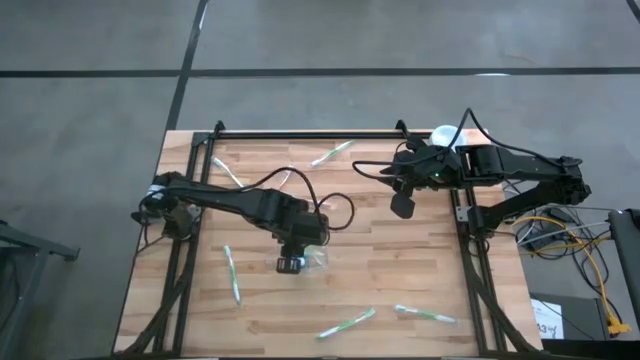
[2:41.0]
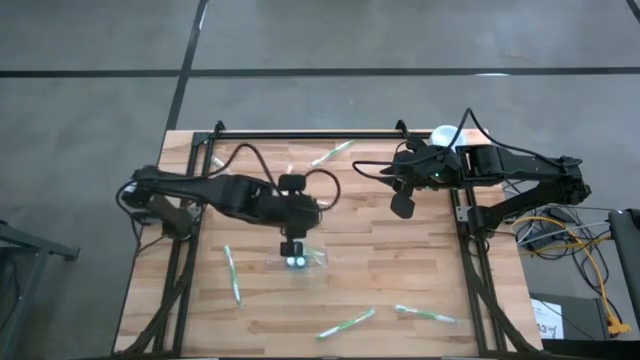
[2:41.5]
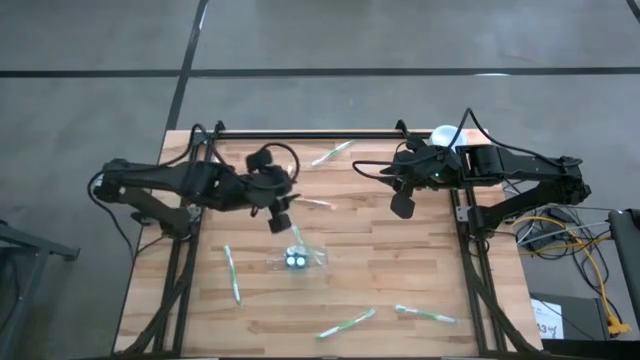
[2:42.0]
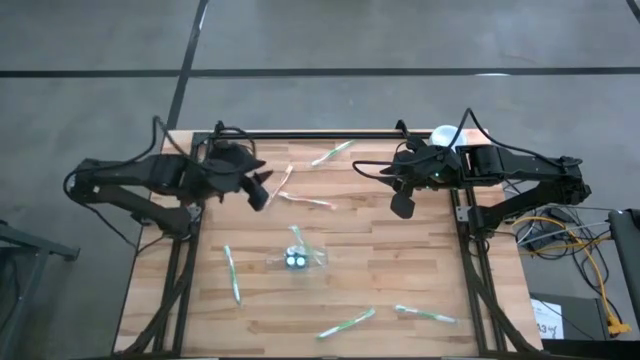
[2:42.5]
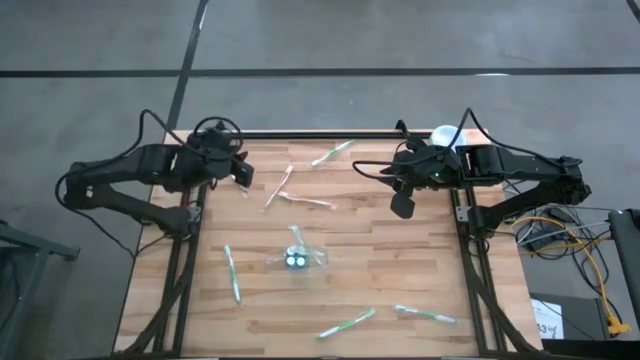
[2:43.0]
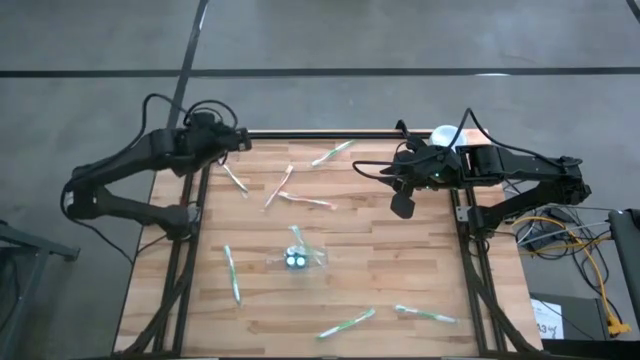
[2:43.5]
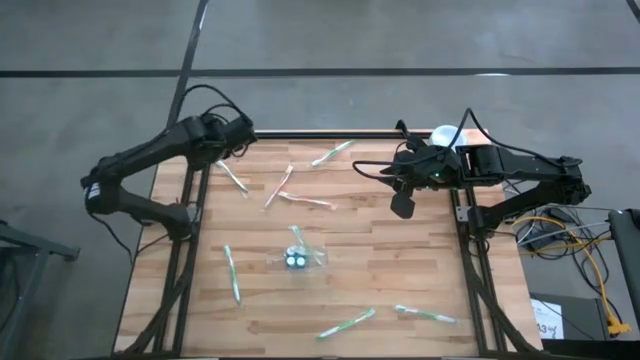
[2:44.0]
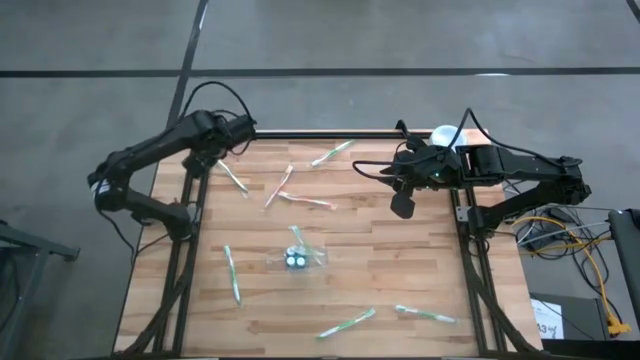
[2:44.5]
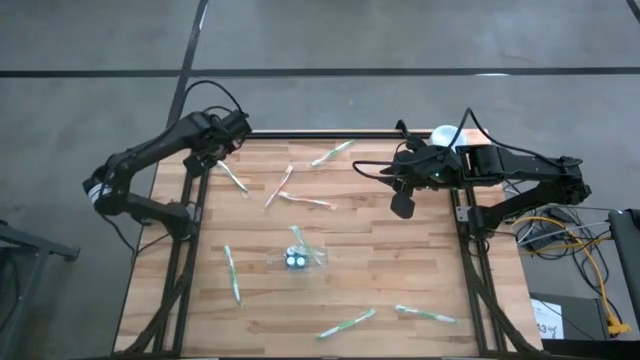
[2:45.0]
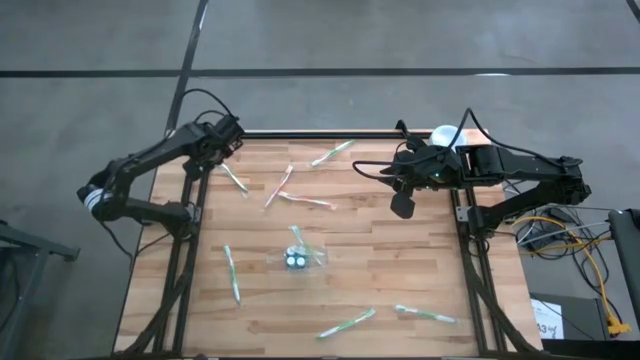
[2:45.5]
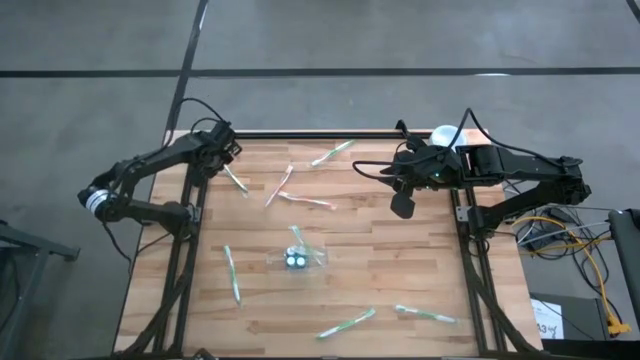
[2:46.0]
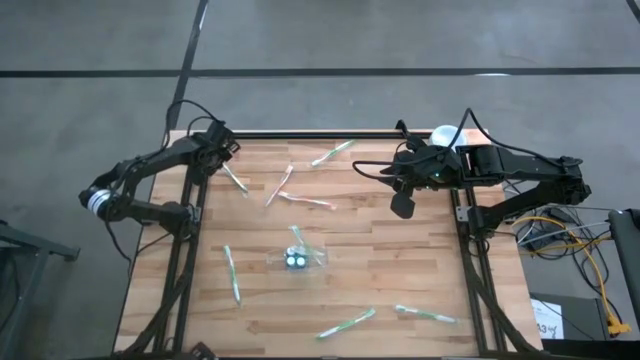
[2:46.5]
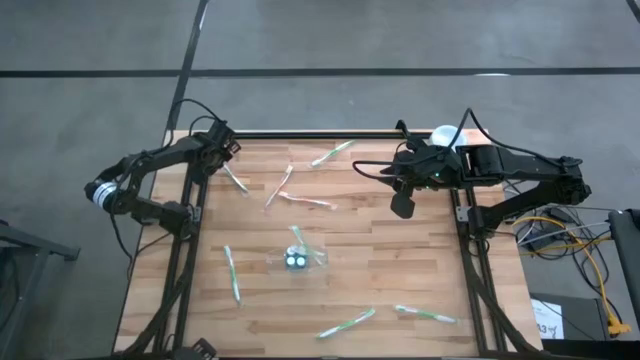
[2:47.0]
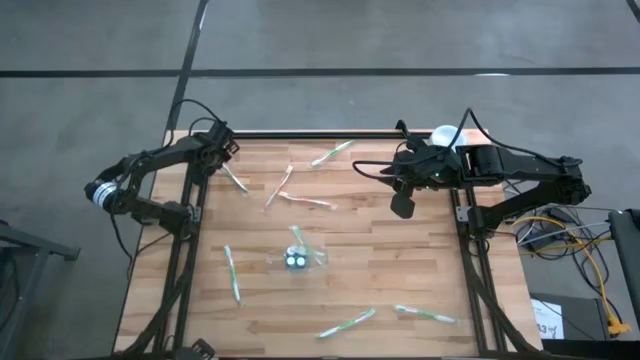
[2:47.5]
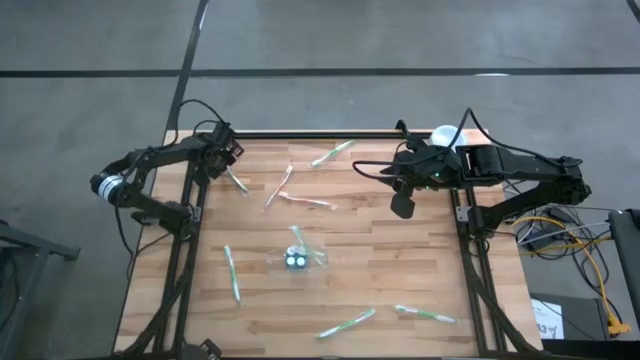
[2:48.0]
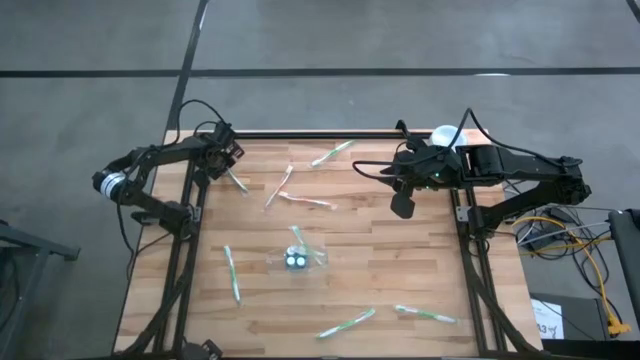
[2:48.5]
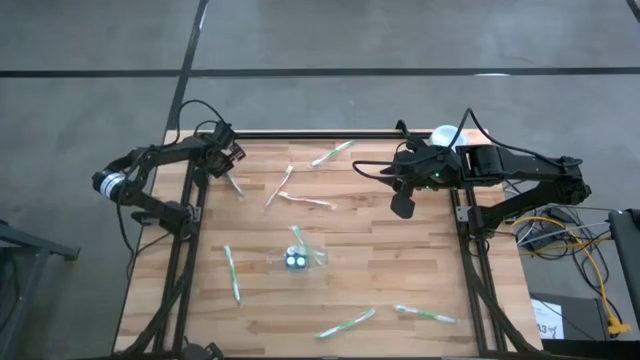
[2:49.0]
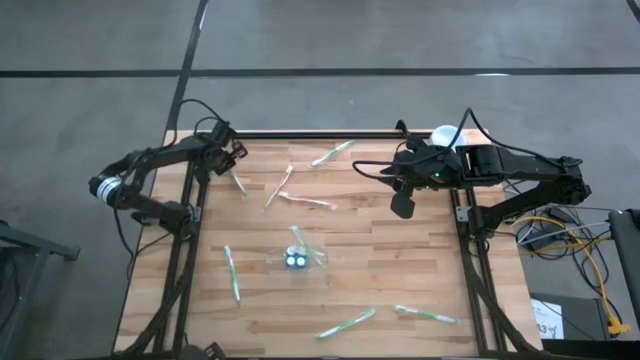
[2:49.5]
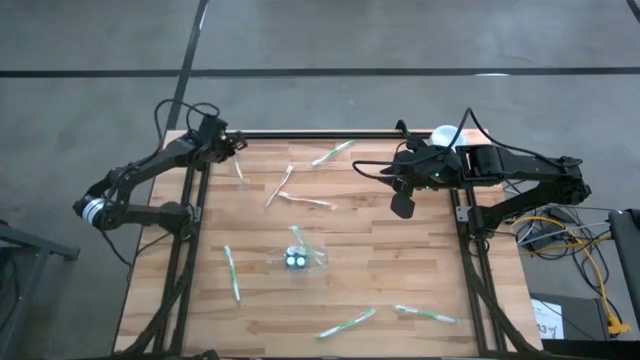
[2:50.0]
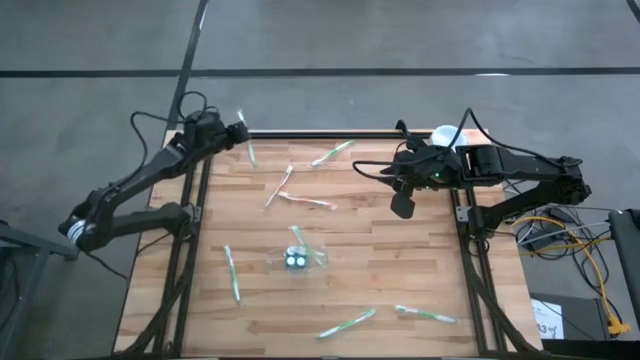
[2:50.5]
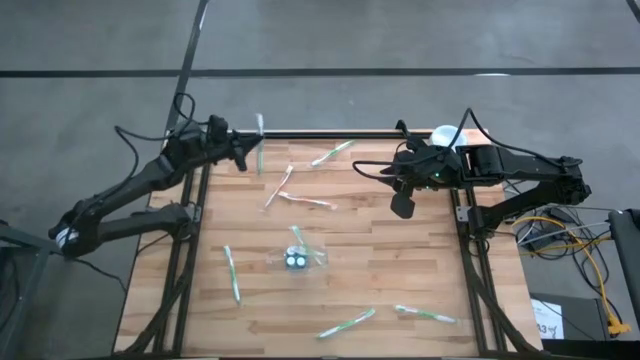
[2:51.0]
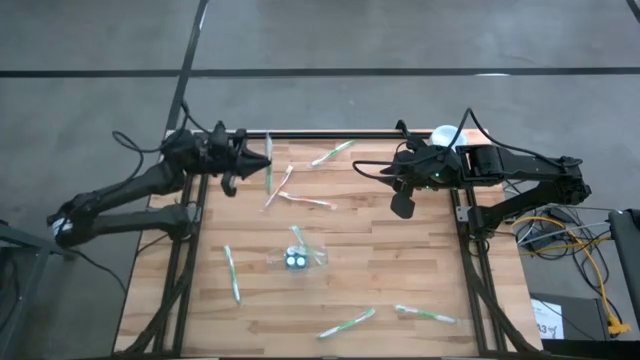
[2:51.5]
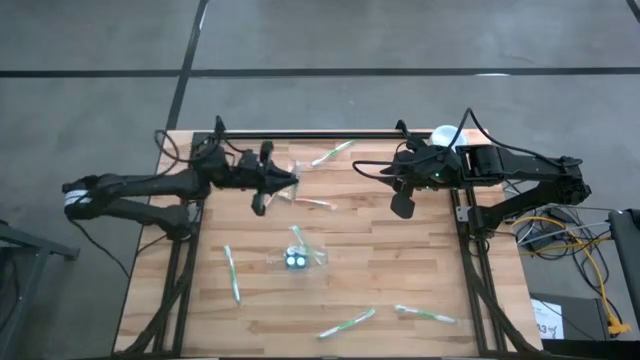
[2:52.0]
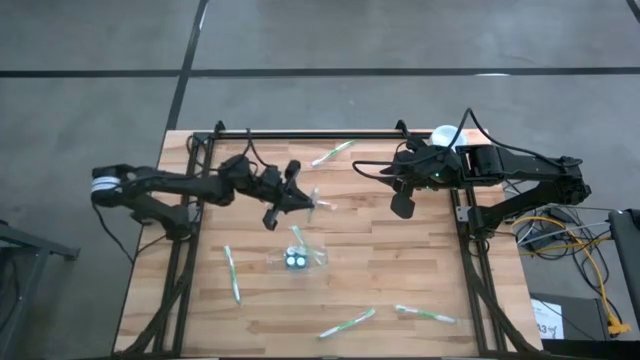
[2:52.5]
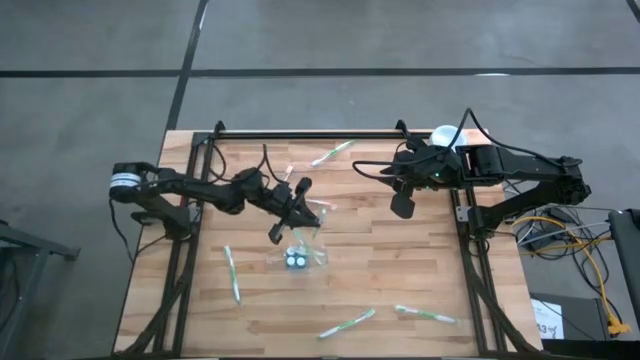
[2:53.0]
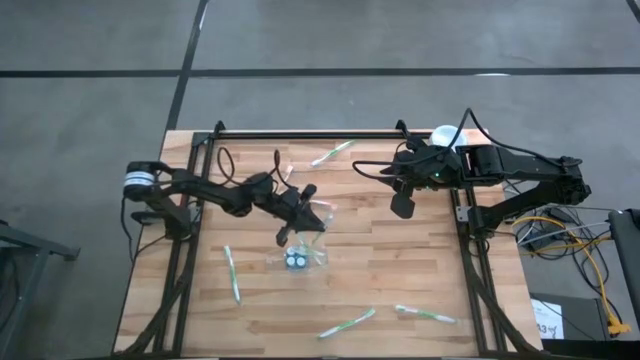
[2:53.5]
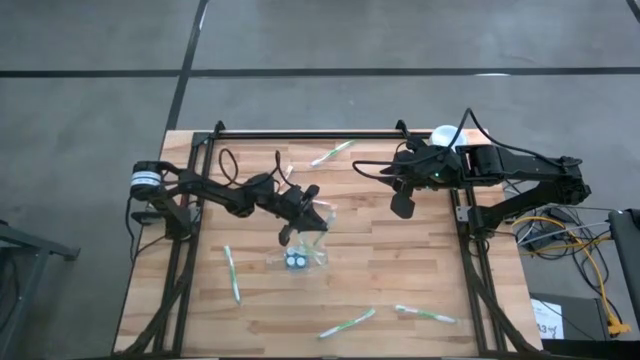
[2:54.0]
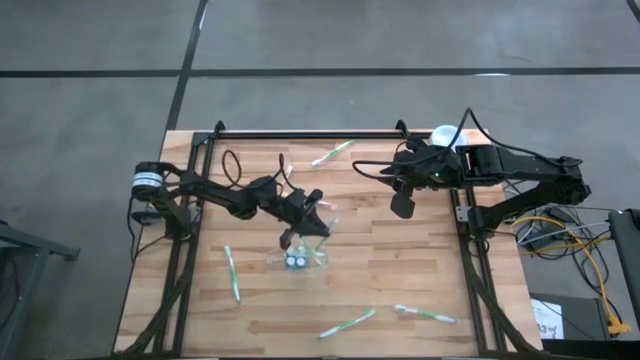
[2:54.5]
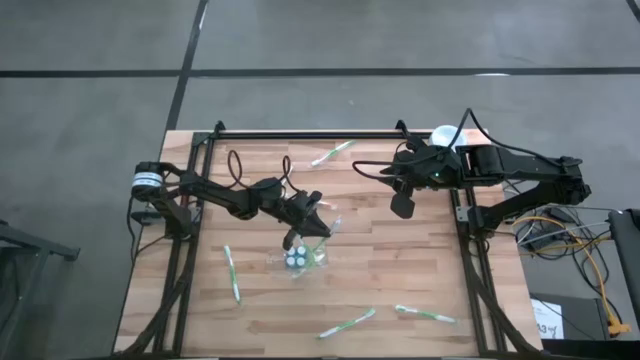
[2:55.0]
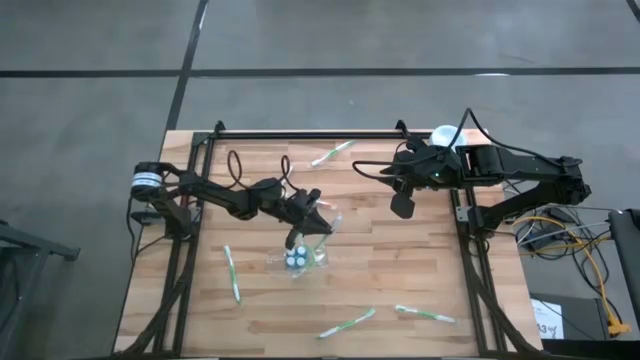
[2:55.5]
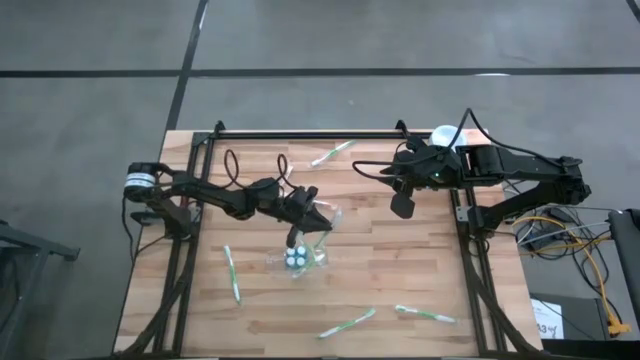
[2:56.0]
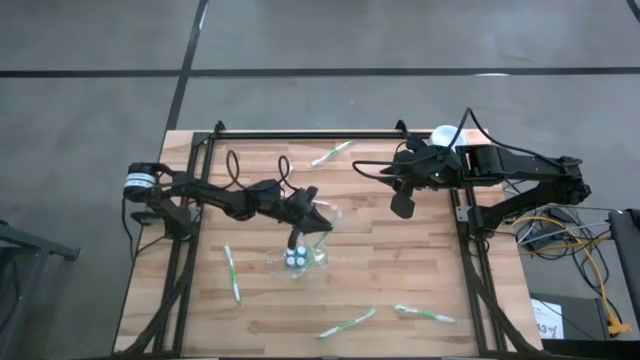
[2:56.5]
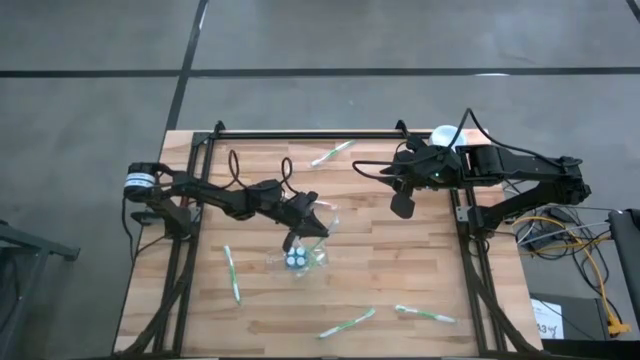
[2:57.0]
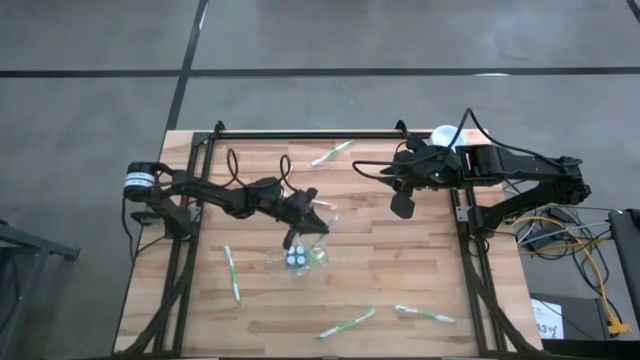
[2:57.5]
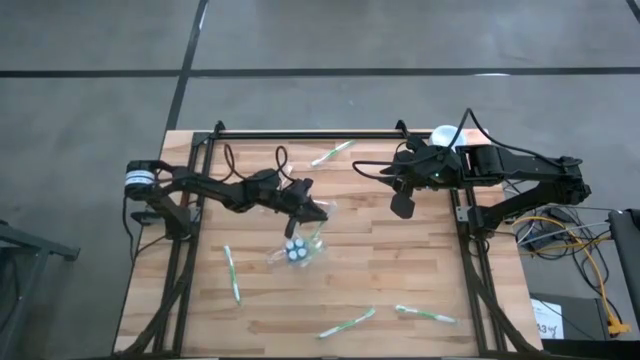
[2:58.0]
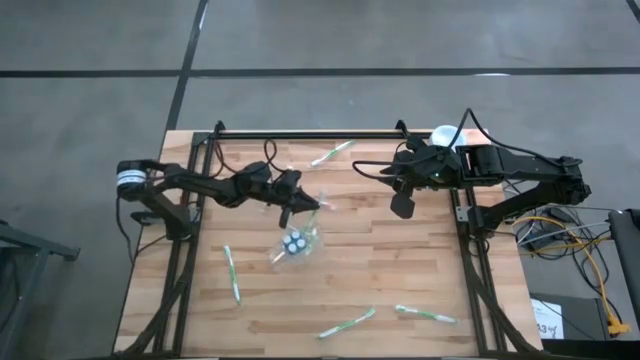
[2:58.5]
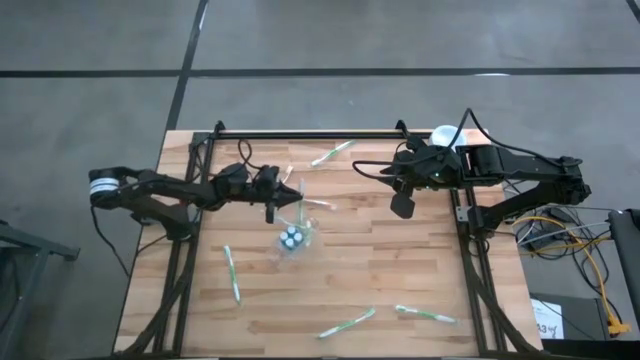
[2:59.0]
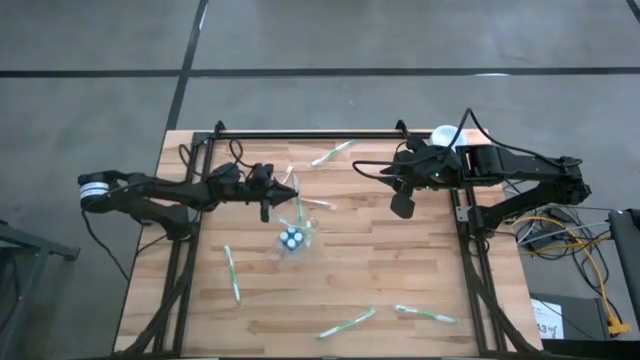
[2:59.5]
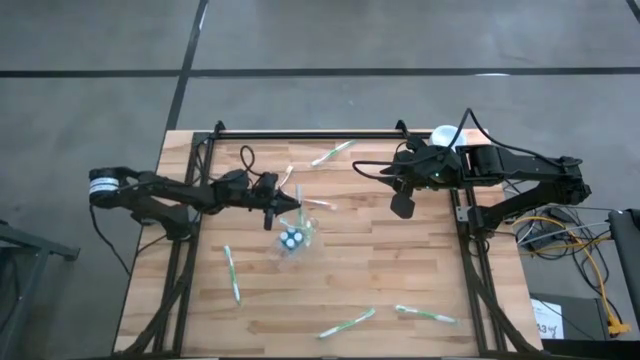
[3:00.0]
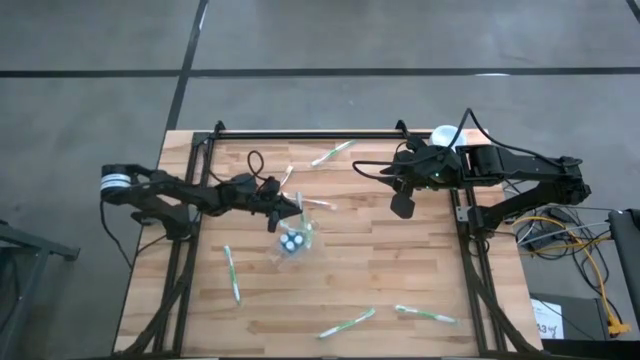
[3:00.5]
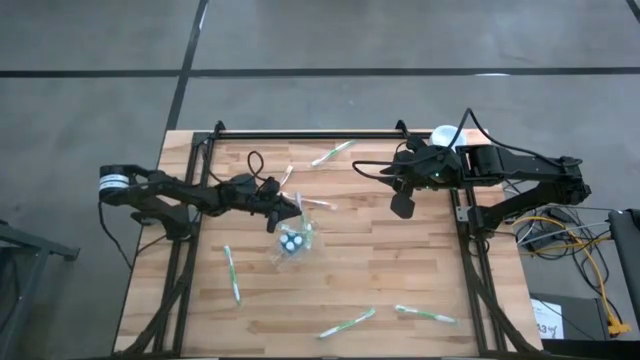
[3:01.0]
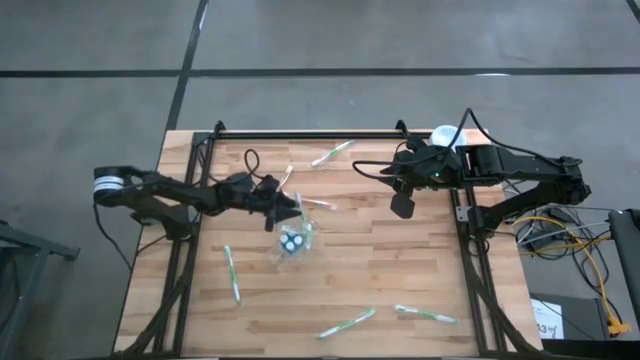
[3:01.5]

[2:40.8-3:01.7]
Task: Pick & Place toothbrushing station
Put the green toothbrush into the transparent organizer

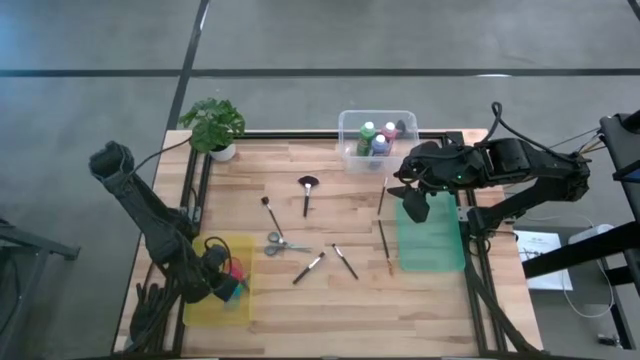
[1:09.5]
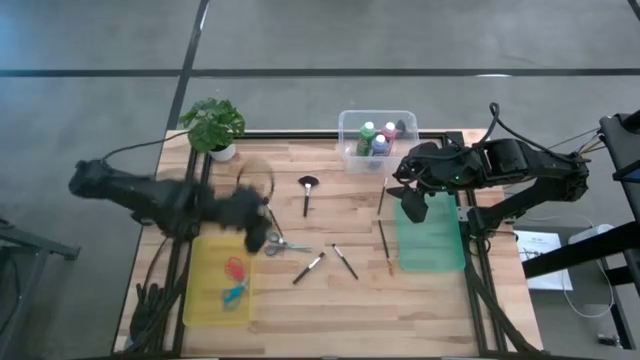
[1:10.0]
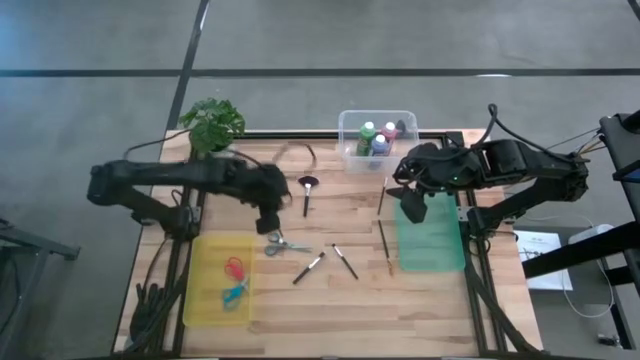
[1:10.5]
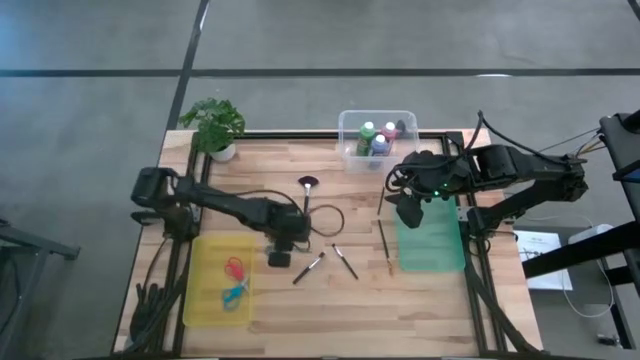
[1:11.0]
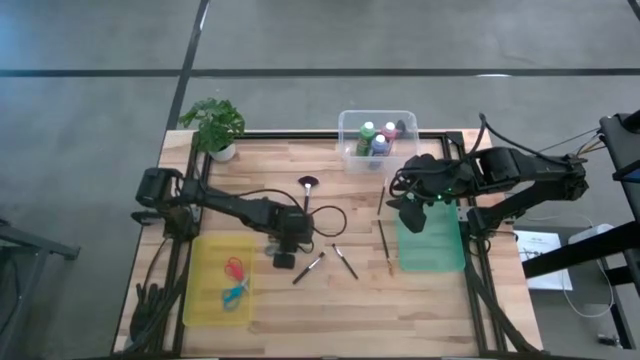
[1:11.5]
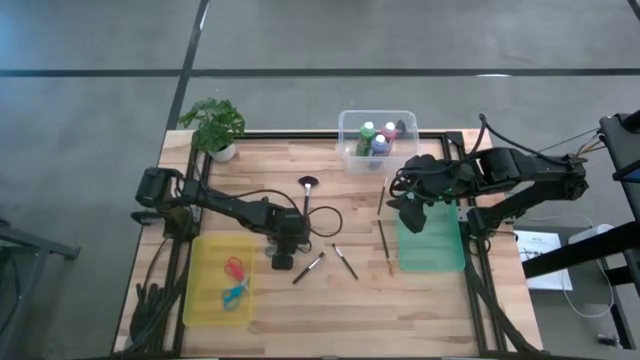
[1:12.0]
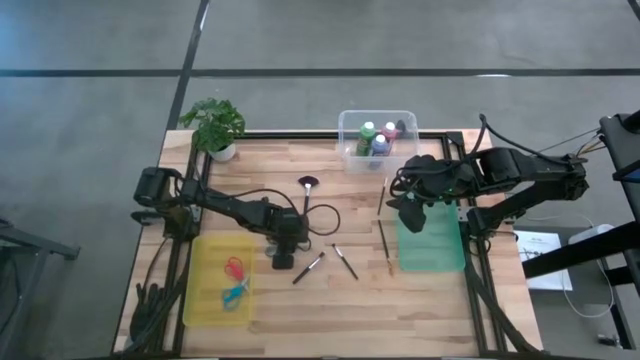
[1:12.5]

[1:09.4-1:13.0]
Task: Pick & Place Paint Supplies
Put the gray and blue scissors into the yellow bin
